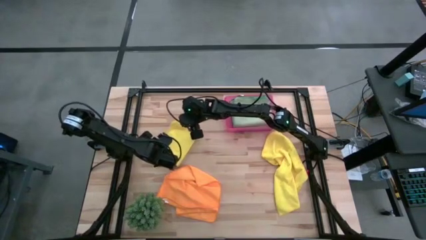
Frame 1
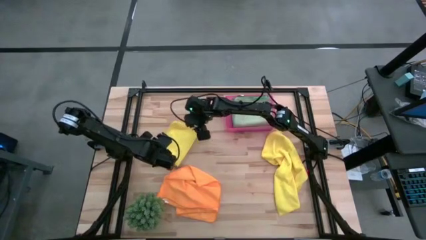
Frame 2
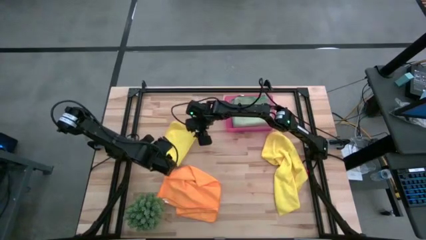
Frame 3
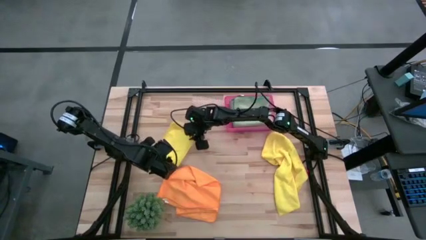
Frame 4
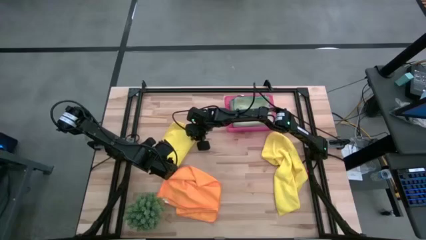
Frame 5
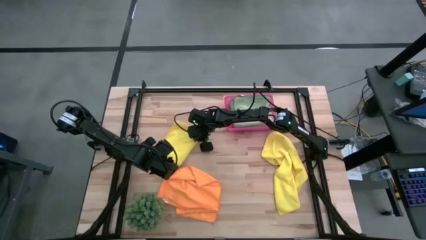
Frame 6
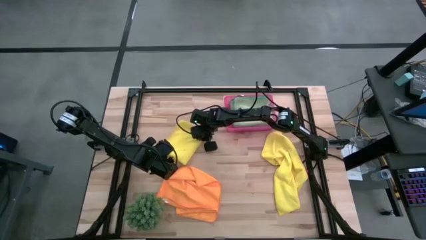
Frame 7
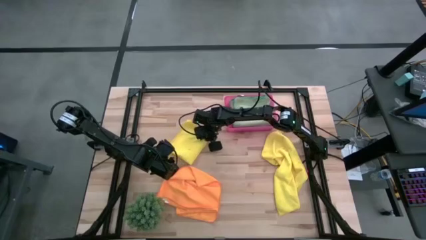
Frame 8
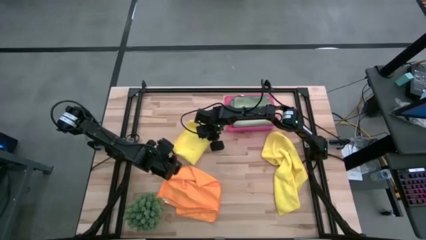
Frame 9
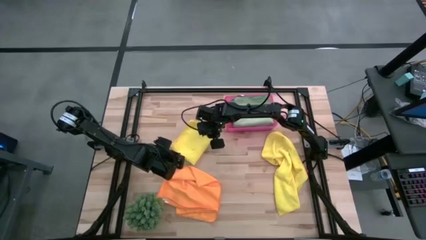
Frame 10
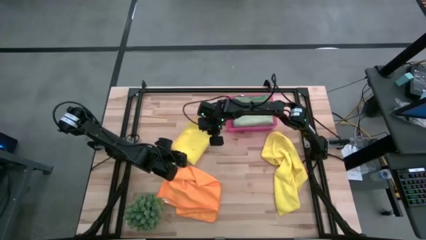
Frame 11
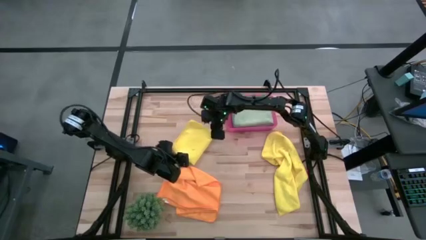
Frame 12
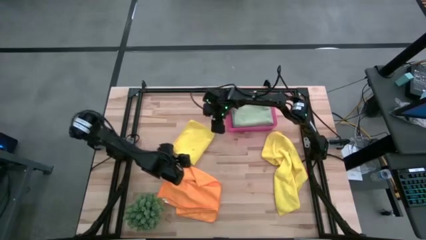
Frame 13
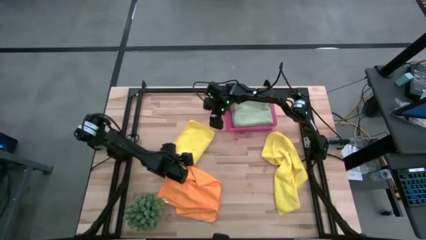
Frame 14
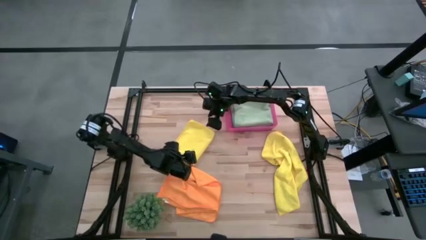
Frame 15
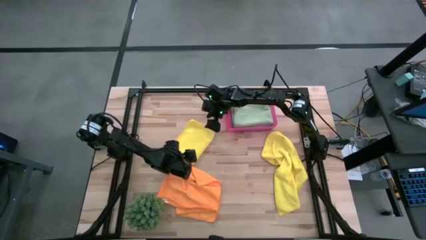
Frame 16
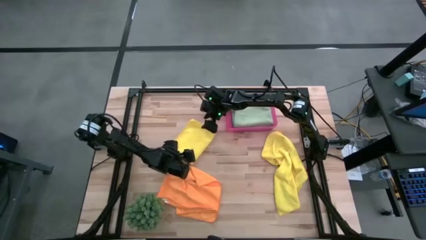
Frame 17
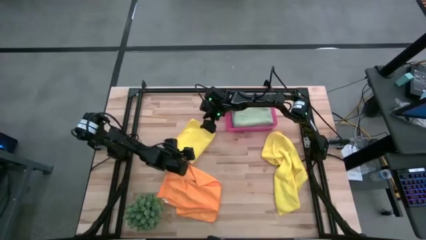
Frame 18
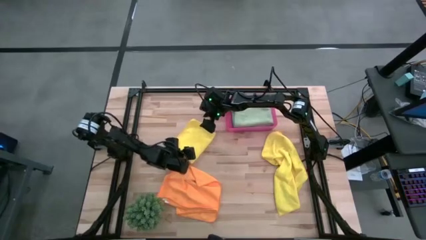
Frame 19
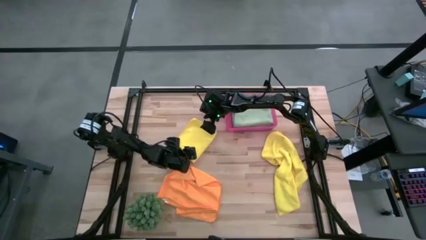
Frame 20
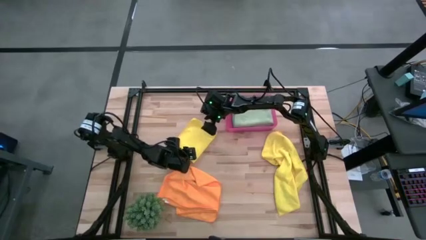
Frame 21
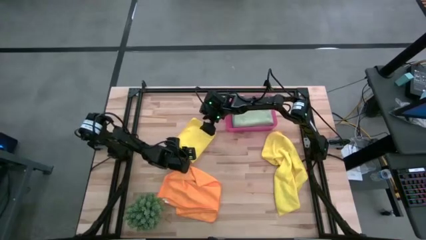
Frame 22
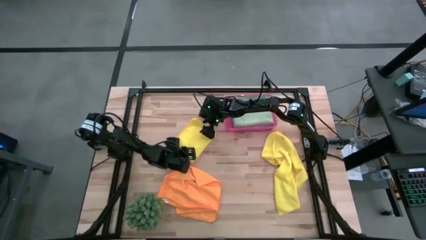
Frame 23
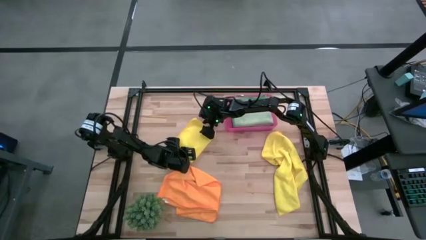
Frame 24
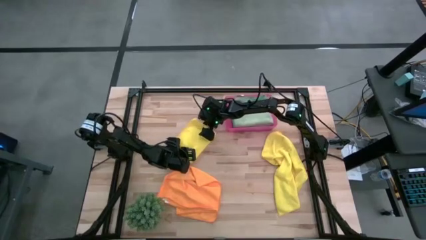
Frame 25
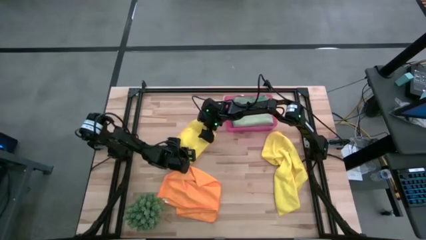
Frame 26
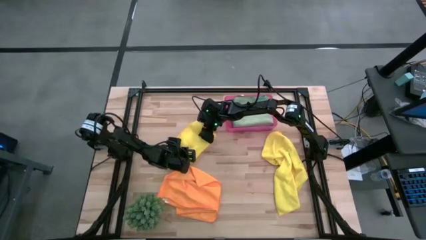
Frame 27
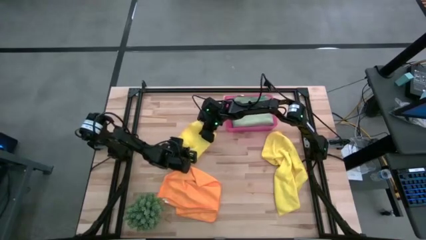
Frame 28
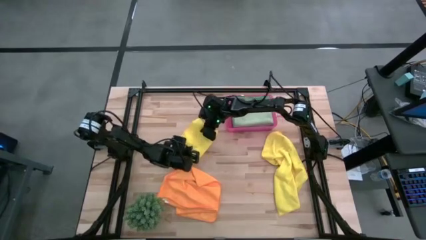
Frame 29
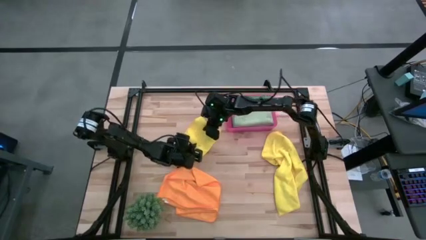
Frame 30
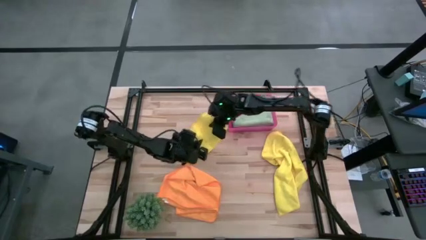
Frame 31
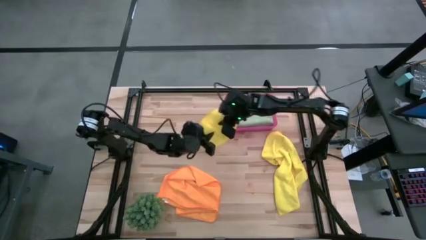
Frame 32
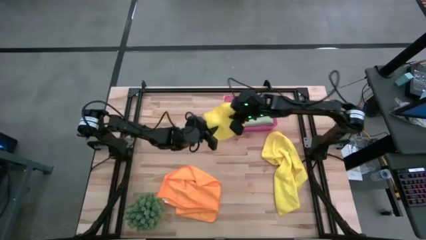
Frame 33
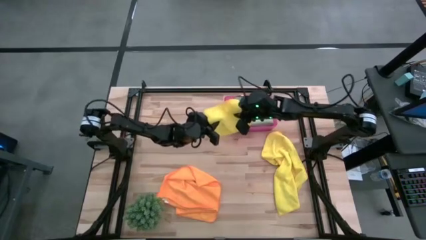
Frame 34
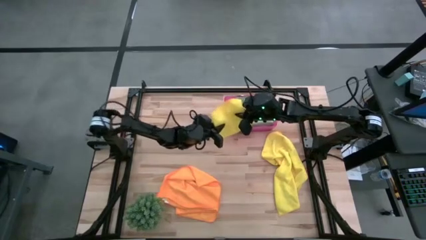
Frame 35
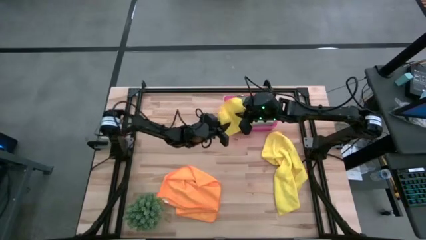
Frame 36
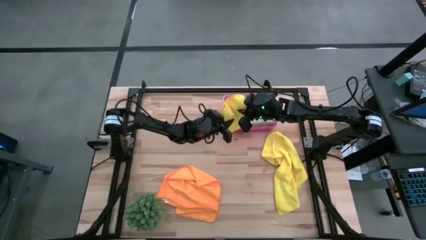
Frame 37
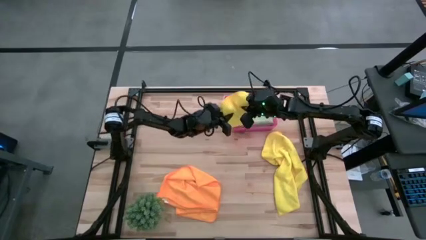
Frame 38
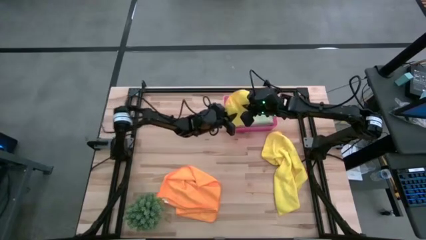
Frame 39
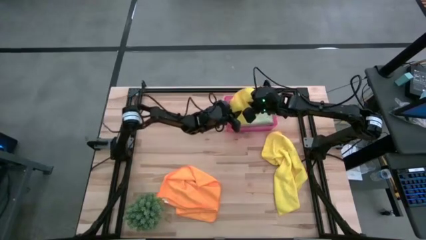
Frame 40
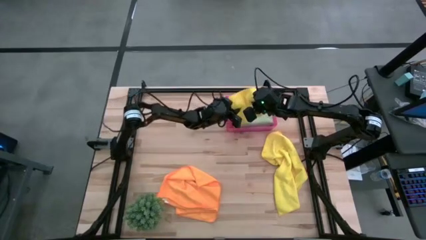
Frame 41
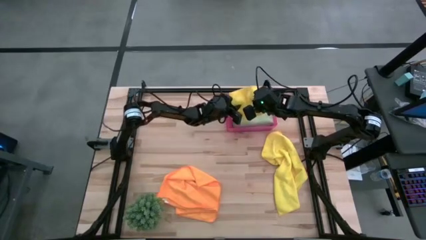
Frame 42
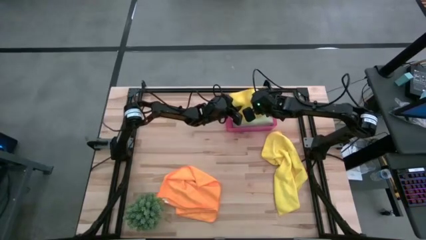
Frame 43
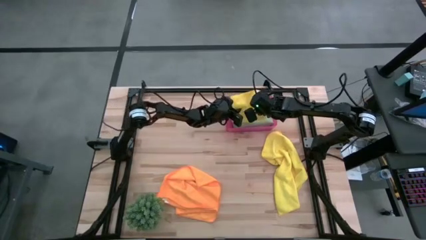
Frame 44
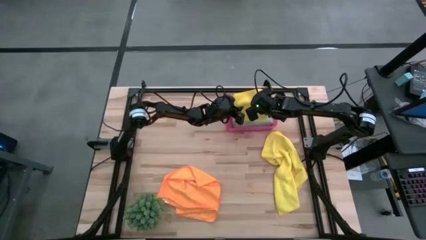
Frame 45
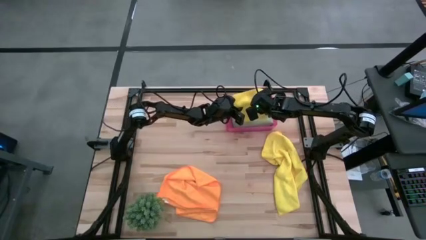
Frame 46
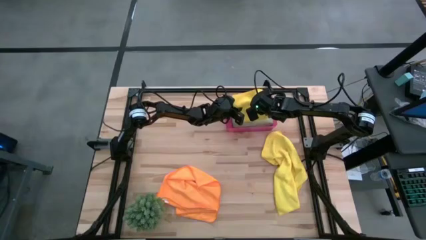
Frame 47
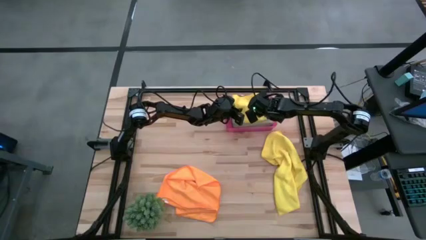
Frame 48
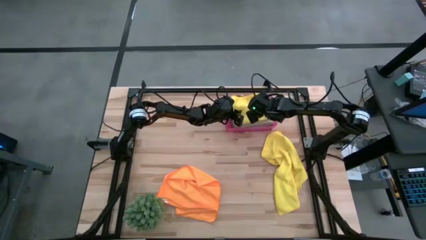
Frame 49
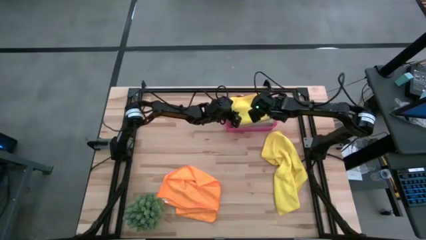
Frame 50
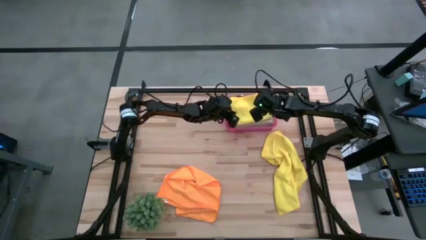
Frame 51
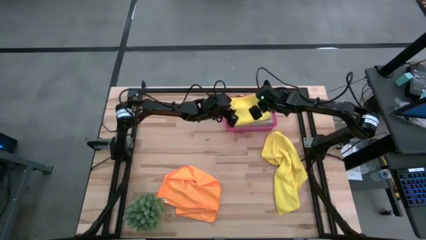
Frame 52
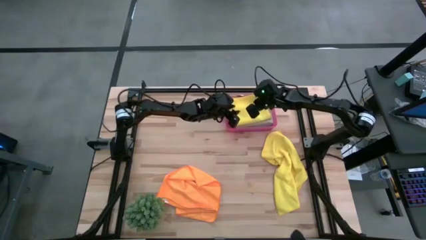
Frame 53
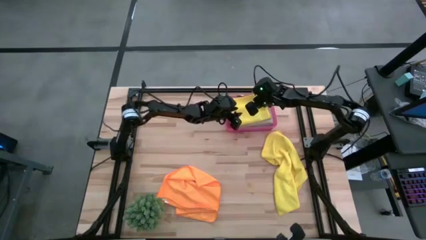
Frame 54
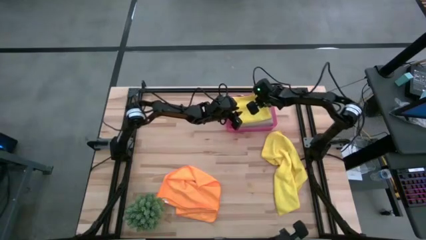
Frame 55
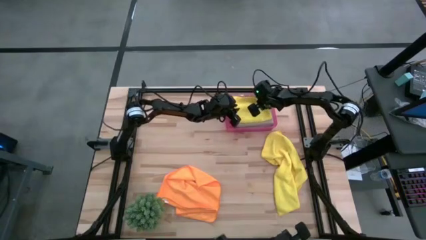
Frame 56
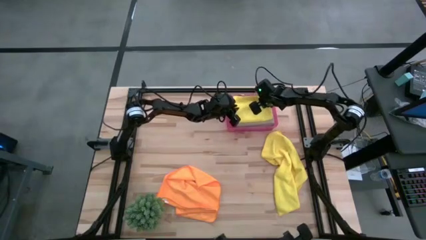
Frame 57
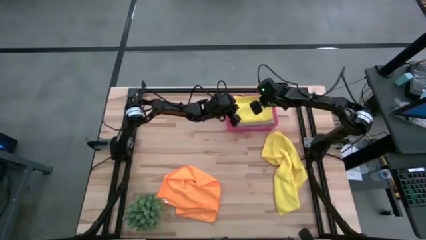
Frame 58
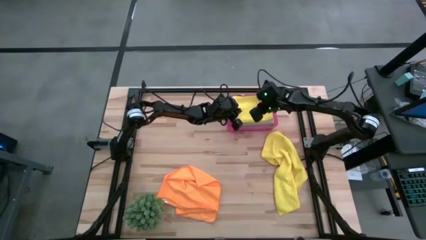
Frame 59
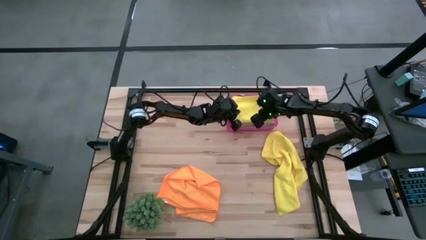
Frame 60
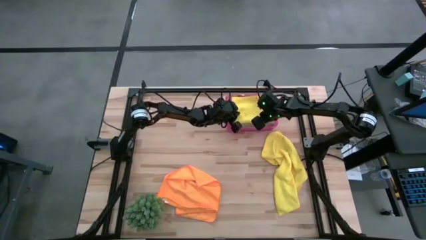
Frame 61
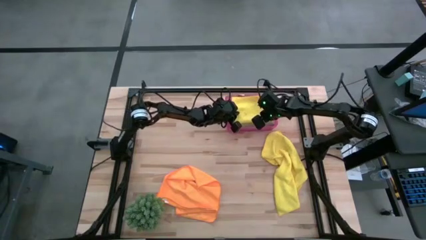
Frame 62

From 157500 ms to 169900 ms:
Task: Fold microfiber towels
Put the top folded yellow microfiber cloth into the red bin
